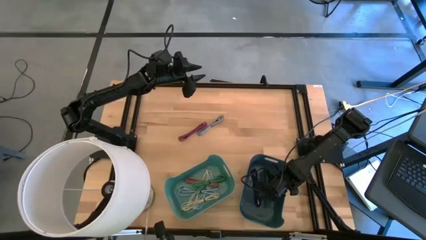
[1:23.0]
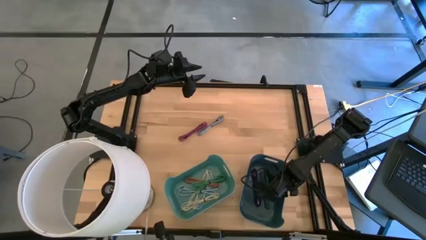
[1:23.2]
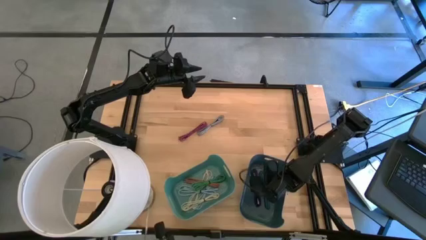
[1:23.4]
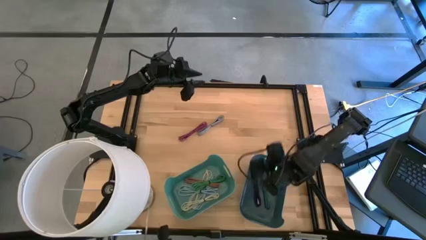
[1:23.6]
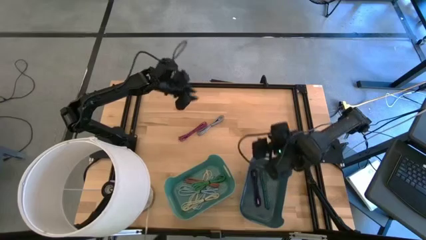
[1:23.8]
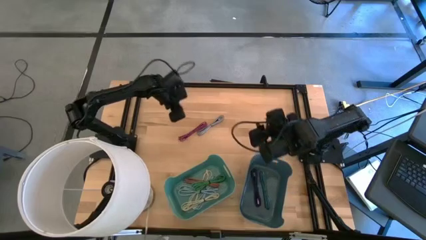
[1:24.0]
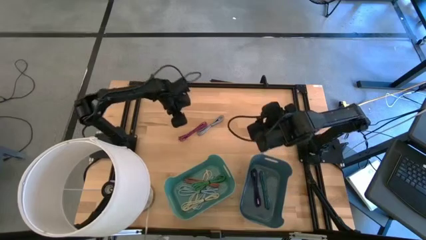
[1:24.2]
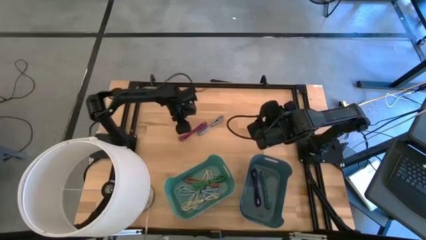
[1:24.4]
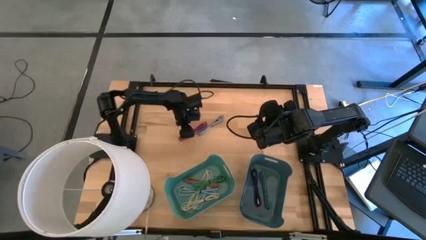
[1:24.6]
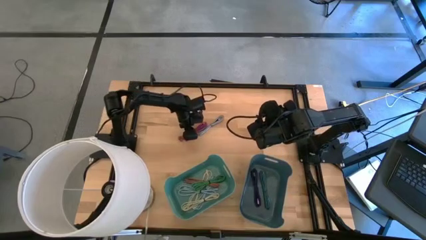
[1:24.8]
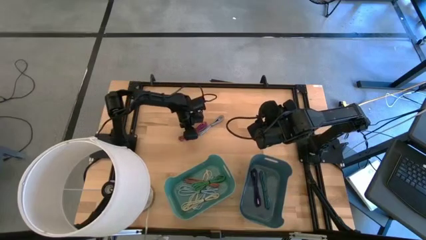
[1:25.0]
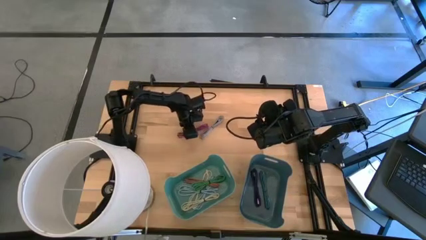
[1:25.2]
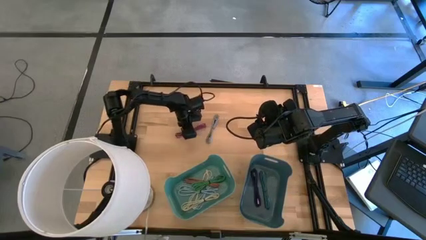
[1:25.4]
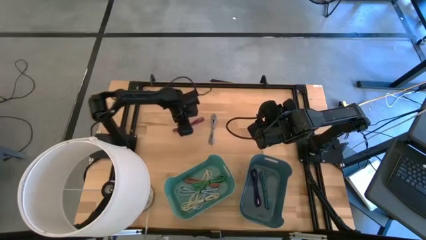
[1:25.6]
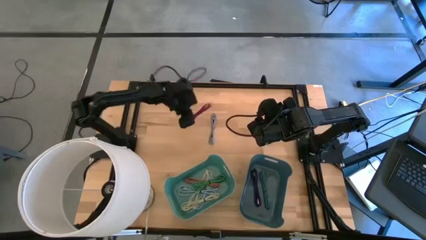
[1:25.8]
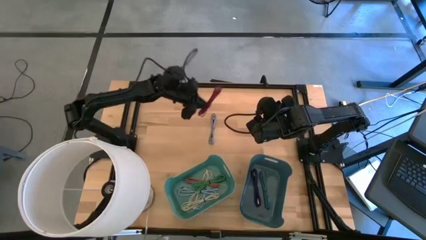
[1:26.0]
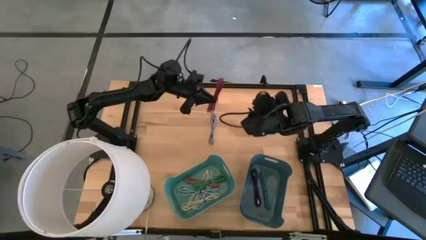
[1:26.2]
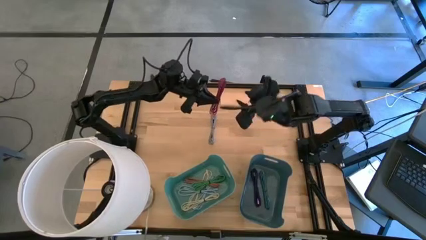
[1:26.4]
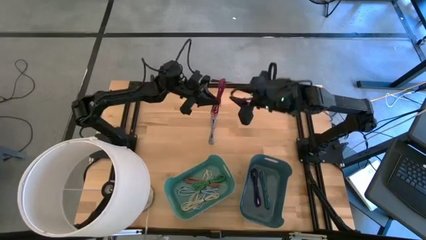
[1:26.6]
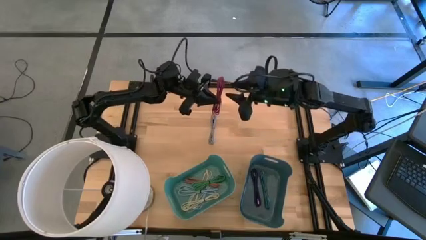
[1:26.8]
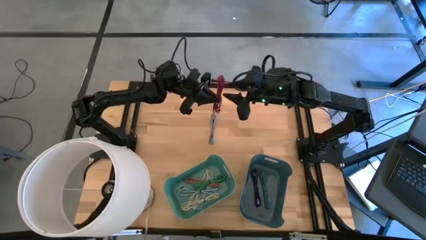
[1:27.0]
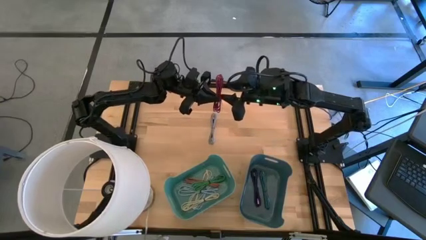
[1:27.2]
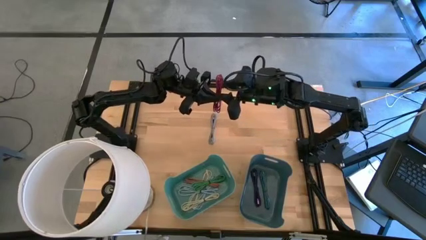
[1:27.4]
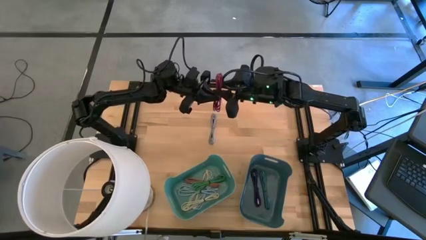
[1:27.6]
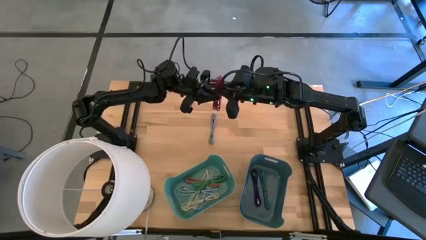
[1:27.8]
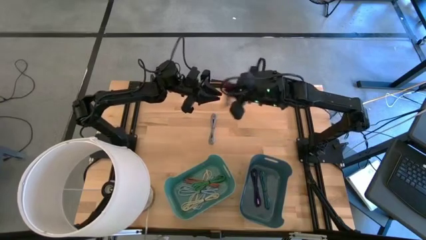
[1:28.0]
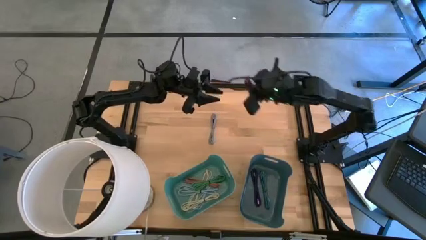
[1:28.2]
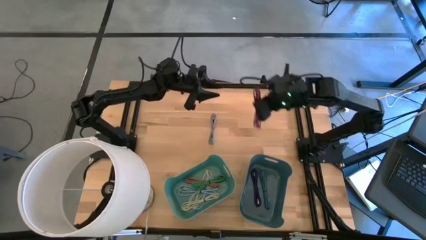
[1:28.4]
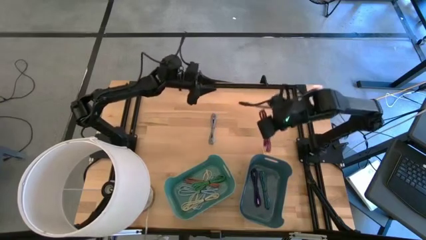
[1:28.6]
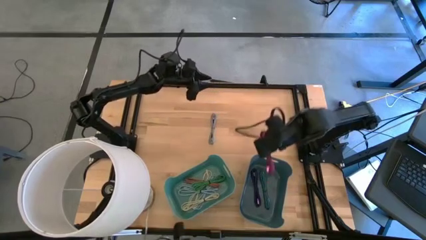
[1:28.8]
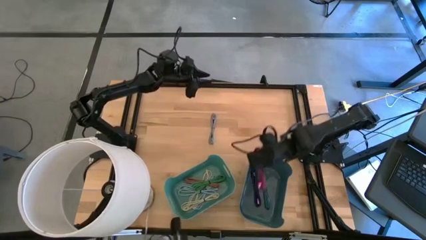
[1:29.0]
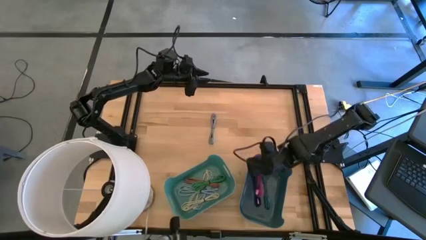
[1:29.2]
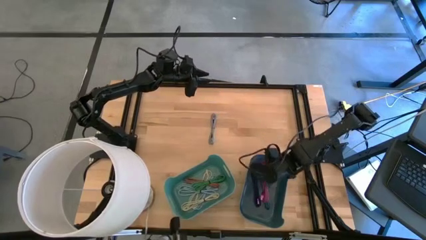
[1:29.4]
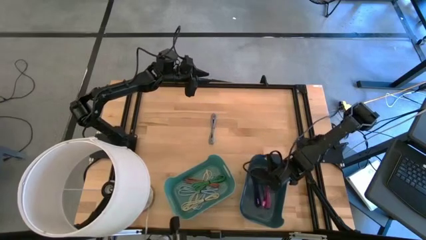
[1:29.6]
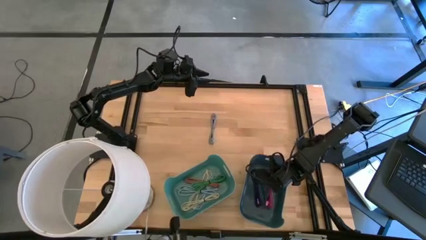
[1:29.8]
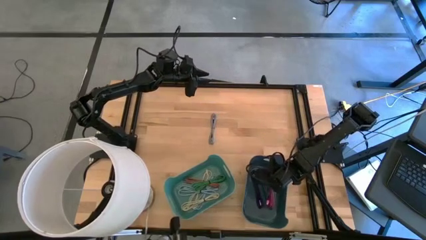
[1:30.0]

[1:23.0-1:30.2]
Put the pink patterned charger cable into the blue bin

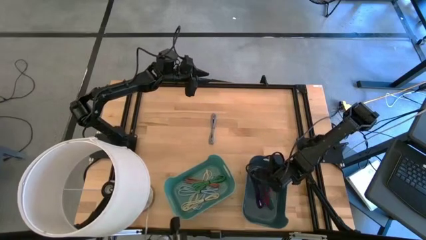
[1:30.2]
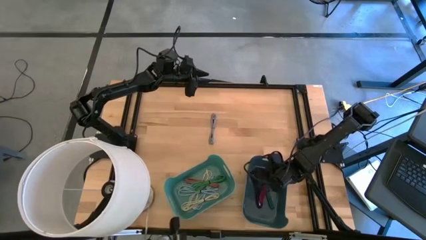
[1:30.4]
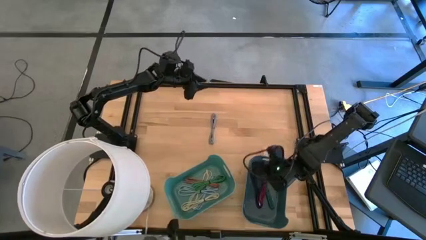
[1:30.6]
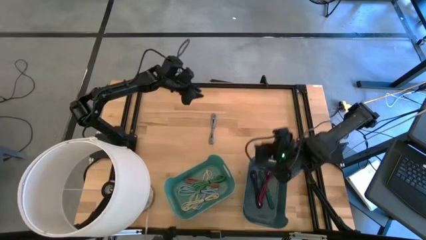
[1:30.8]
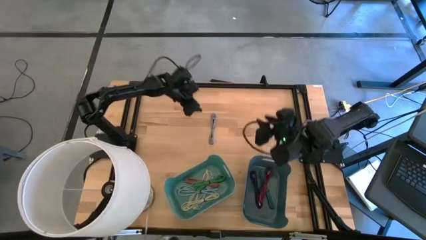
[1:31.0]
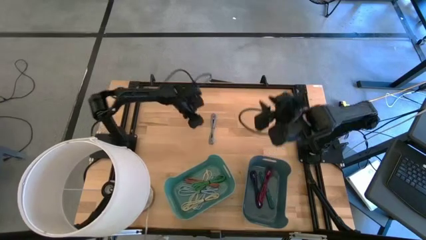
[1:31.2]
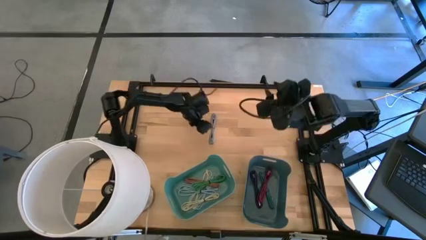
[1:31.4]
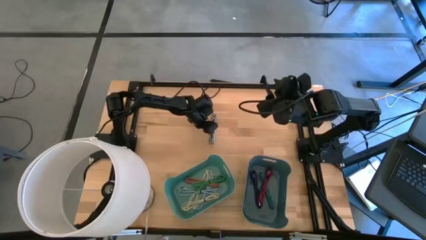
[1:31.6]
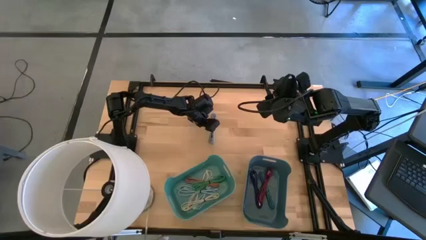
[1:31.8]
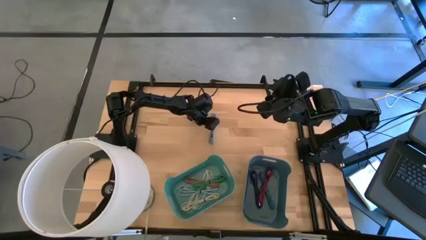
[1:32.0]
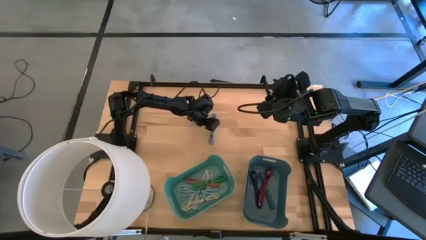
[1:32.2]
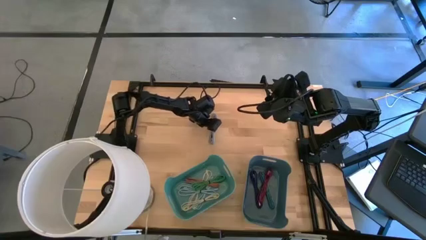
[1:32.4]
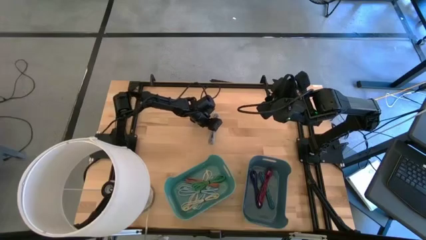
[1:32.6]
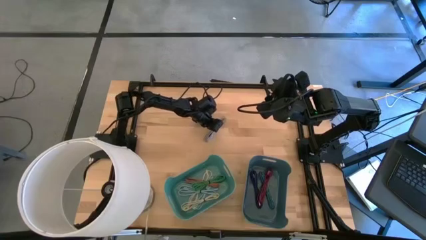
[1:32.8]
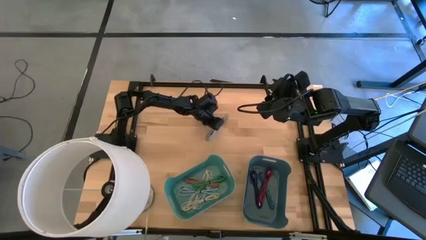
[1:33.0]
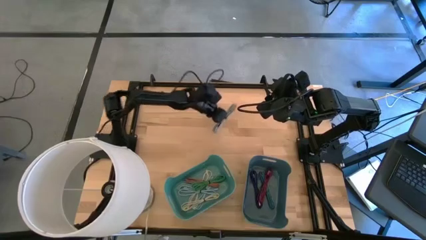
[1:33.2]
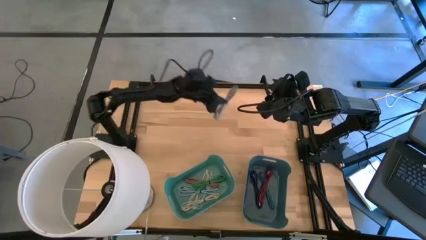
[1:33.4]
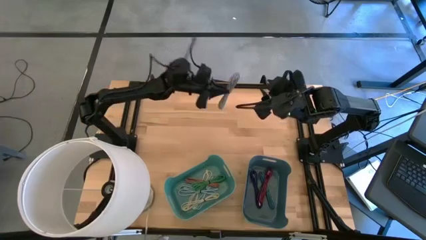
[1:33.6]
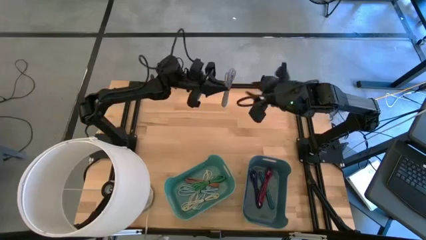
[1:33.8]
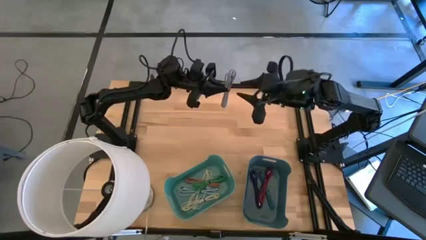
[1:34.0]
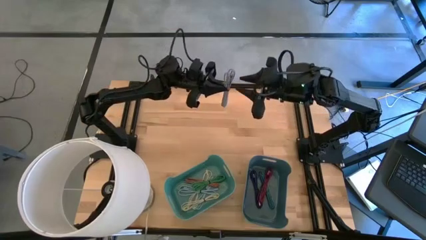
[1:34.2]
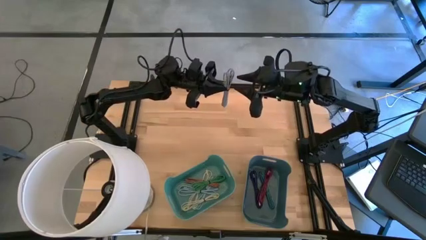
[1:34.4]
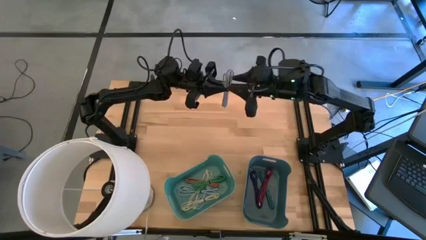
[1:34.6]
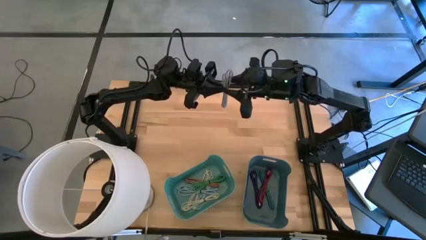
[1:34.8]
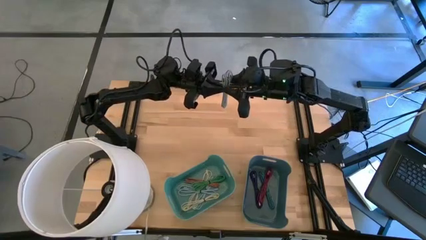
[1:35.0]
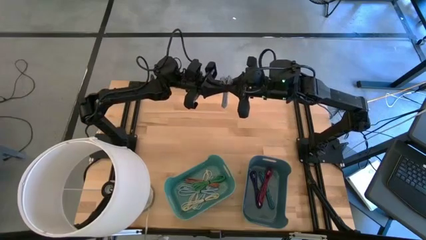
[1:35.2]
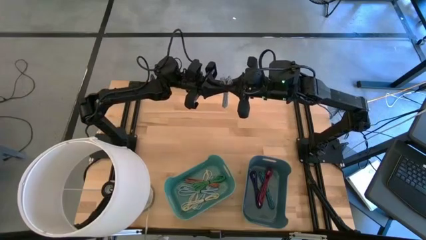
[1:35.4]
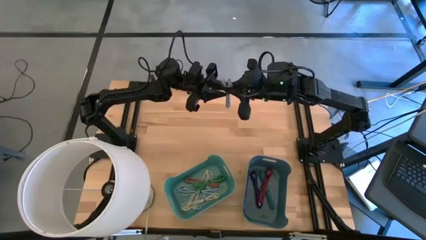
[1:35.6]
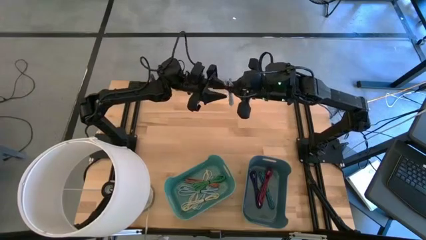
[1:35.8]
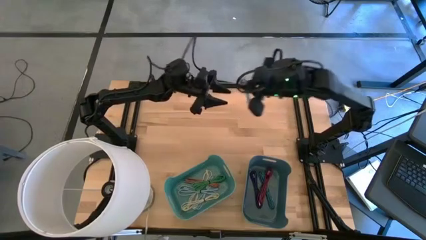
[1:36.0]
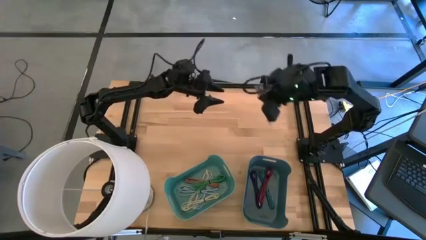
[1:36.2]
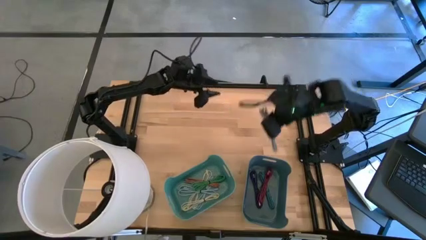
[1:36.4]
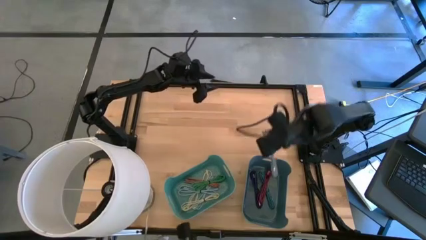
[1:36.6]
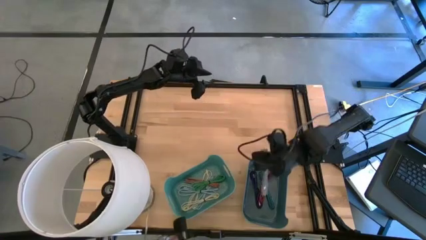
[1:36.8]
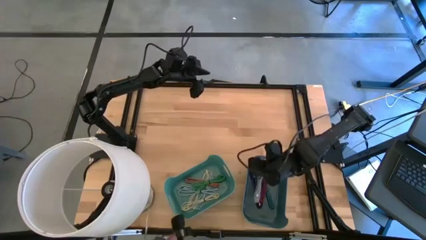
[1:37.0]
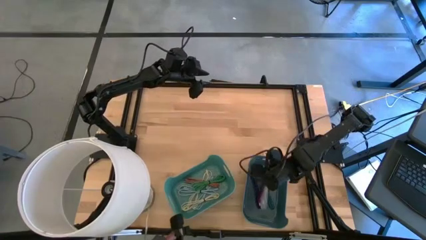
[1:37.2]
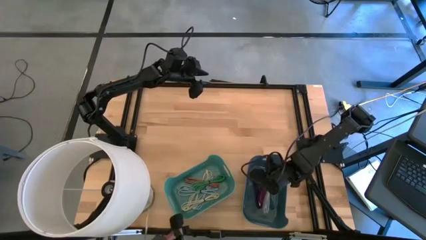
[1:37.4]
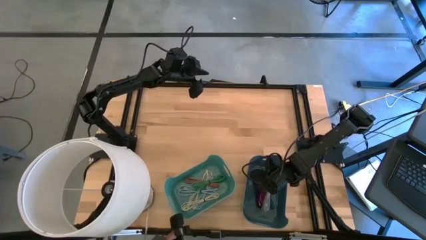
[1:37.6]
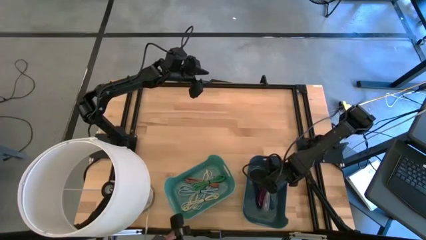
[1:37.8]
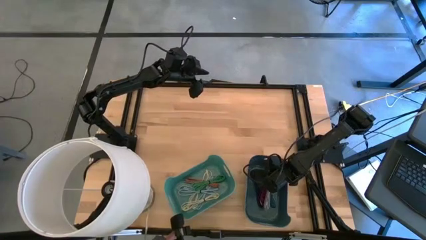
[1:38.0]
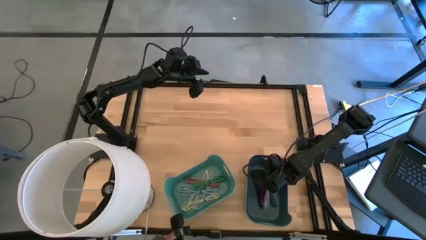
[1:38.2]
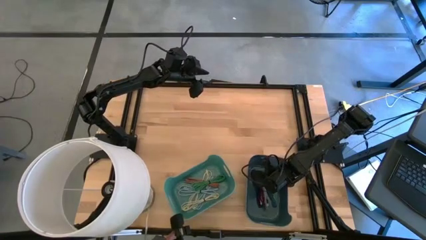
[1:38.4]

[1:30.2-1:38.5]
Put the gray patterned charger cable into the green bin
